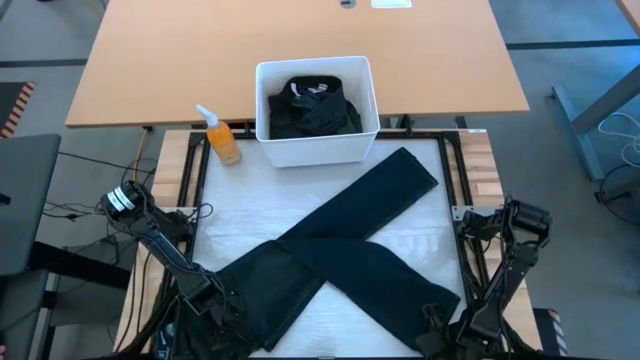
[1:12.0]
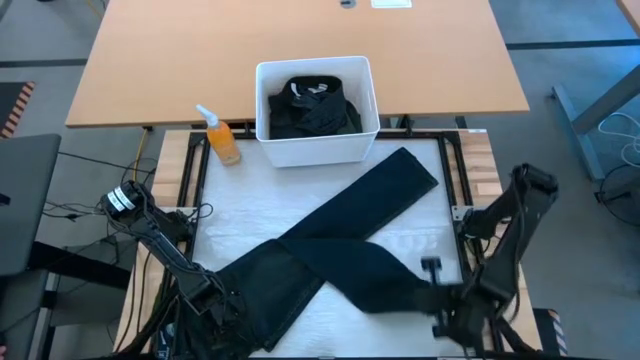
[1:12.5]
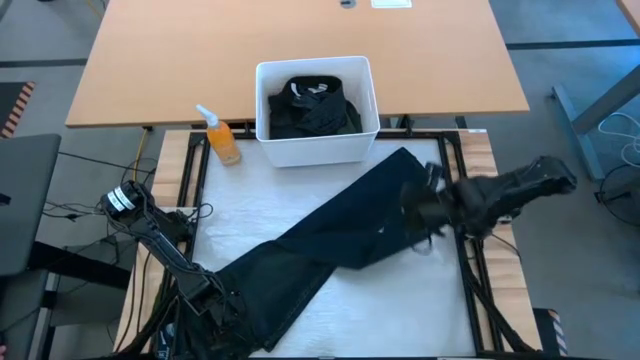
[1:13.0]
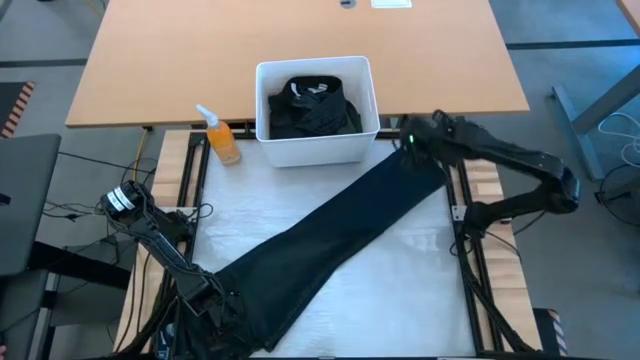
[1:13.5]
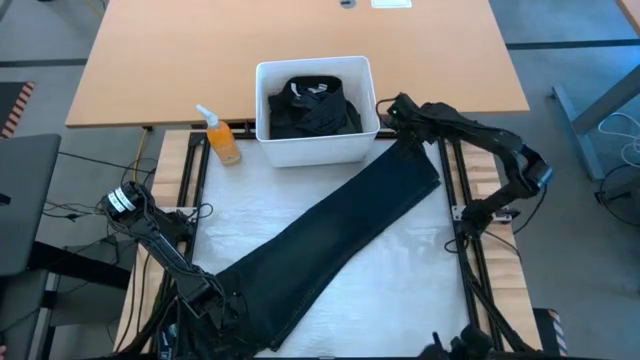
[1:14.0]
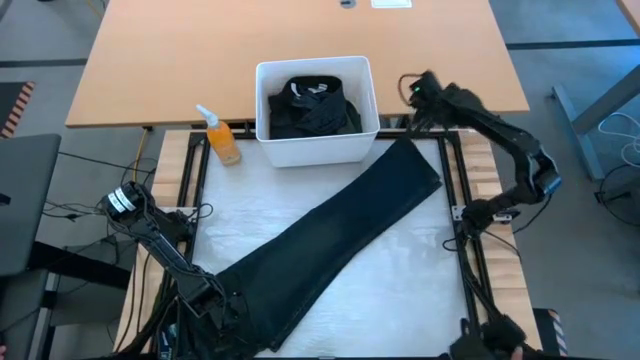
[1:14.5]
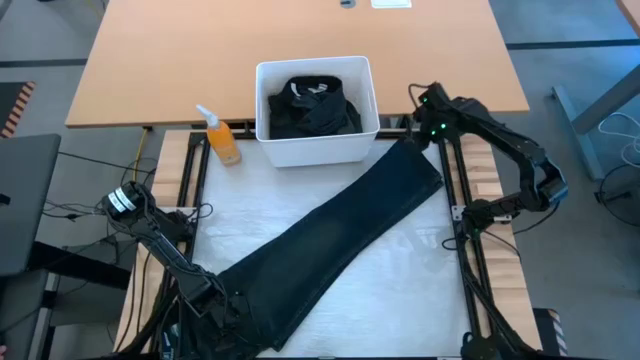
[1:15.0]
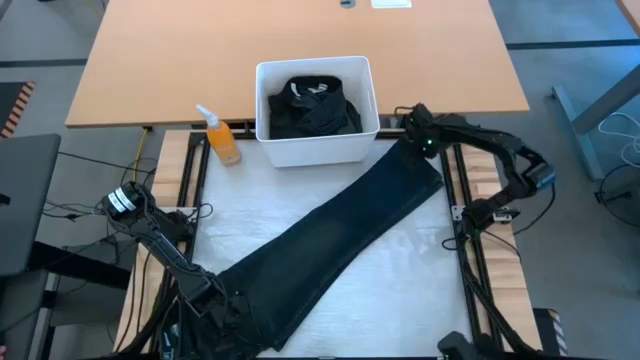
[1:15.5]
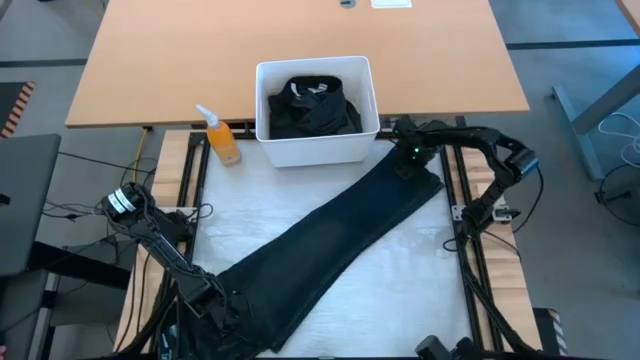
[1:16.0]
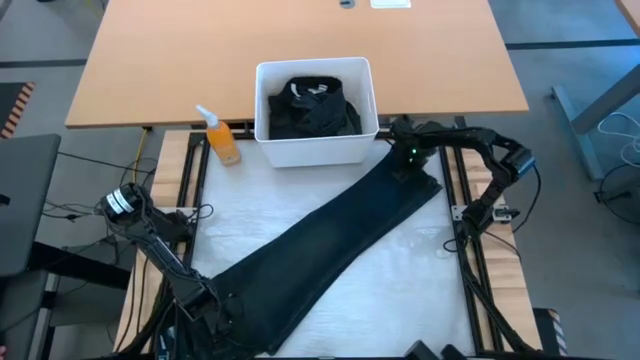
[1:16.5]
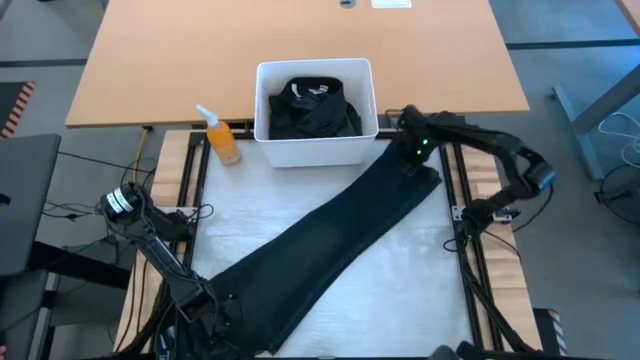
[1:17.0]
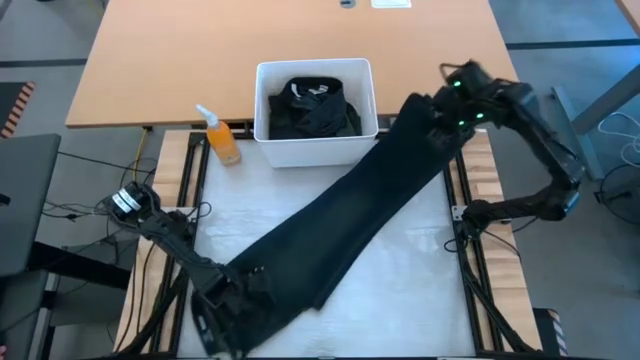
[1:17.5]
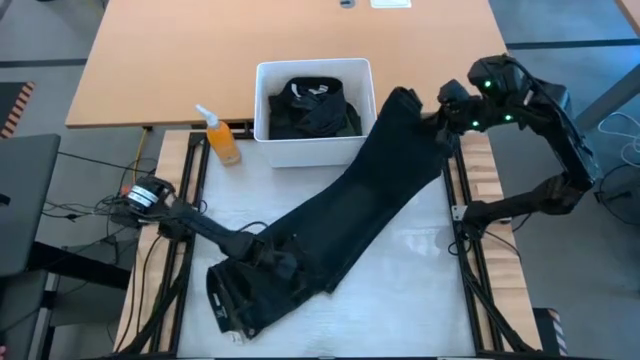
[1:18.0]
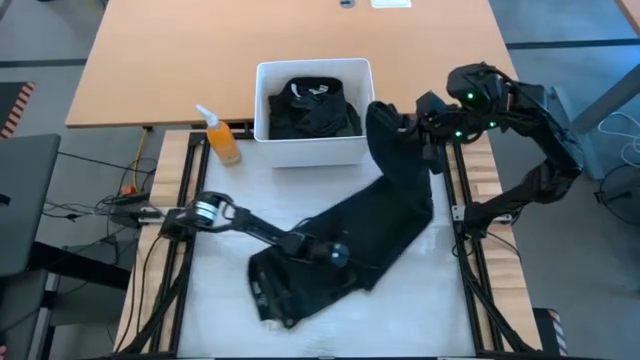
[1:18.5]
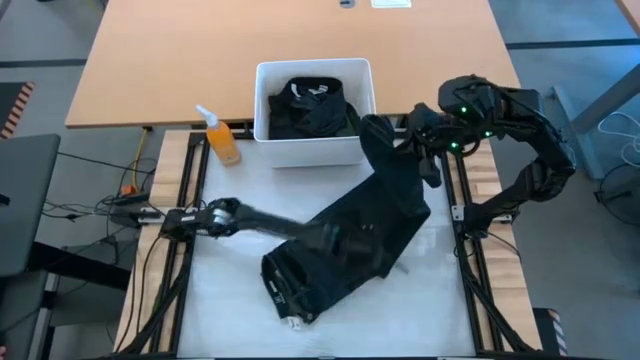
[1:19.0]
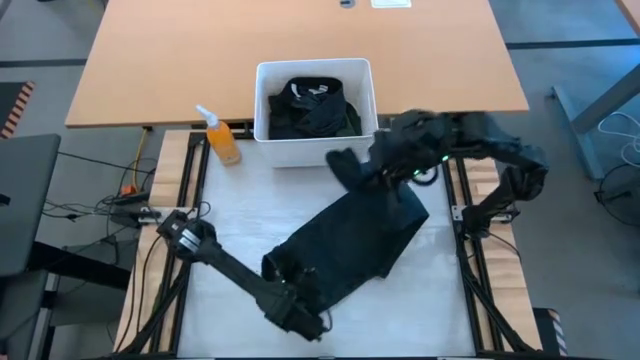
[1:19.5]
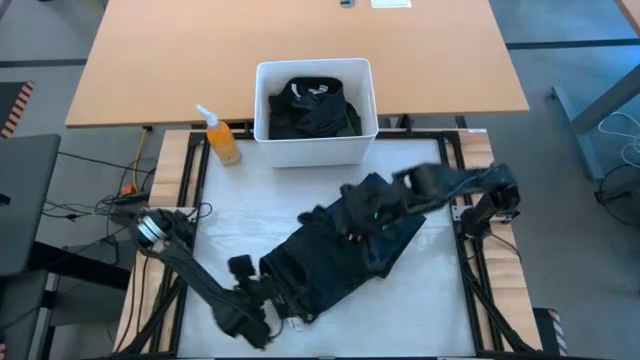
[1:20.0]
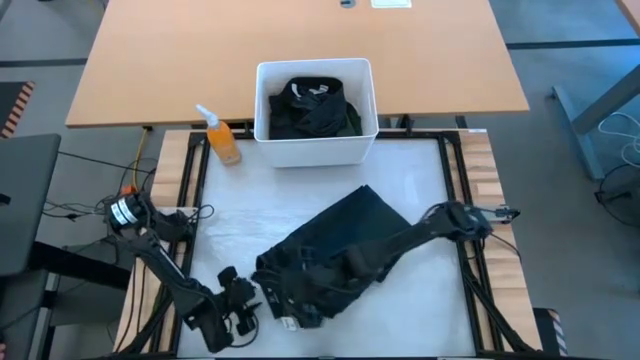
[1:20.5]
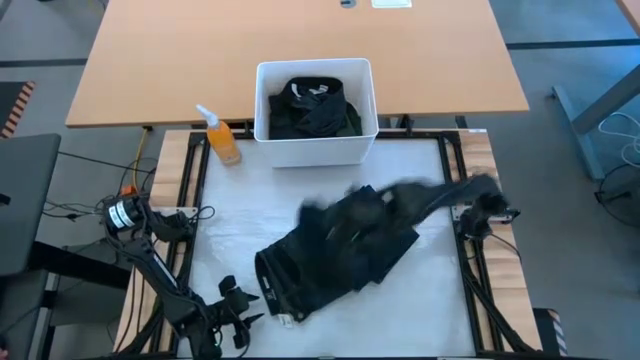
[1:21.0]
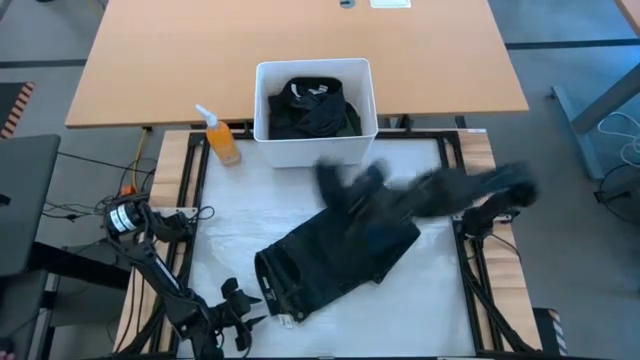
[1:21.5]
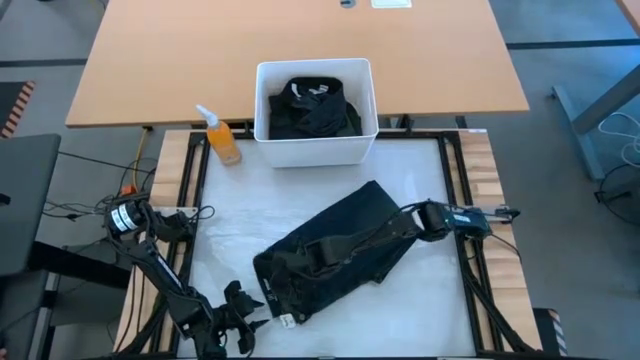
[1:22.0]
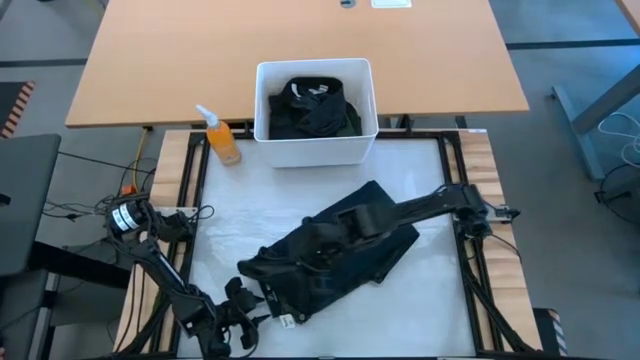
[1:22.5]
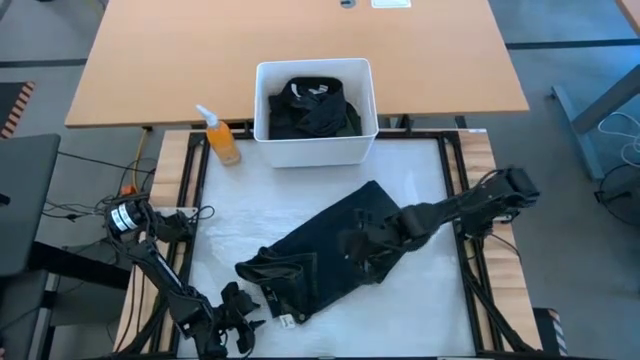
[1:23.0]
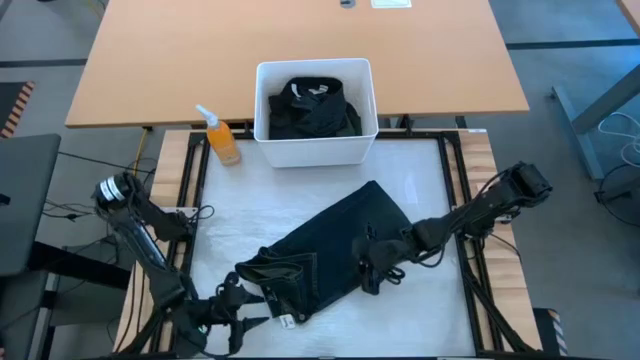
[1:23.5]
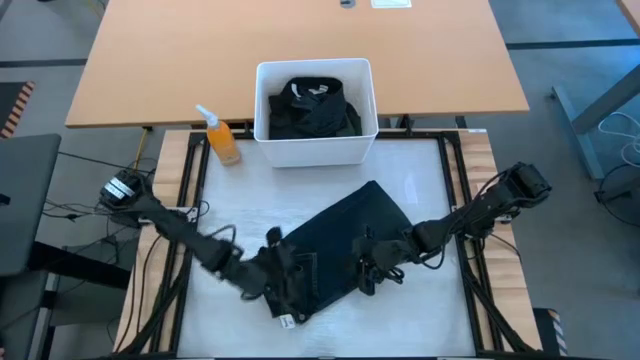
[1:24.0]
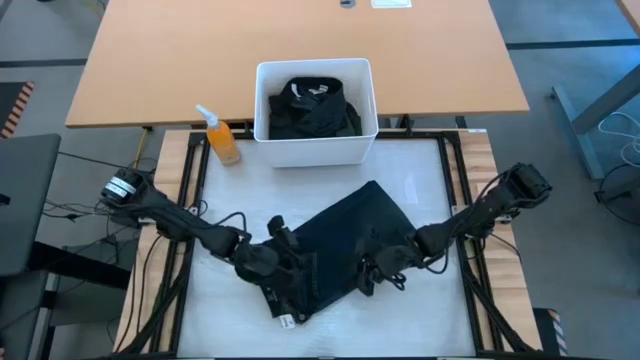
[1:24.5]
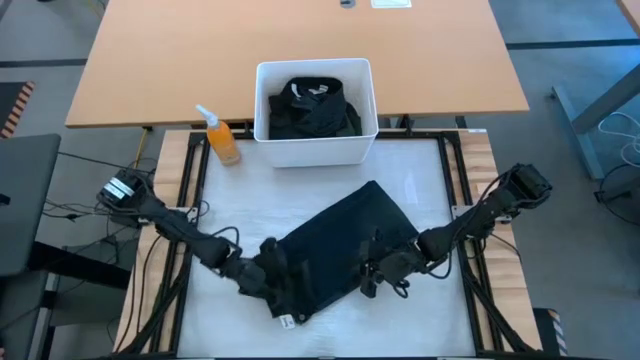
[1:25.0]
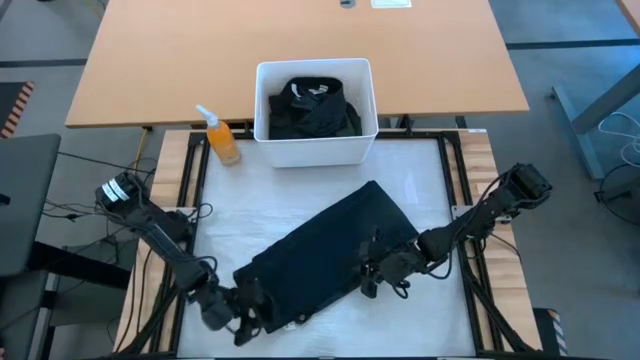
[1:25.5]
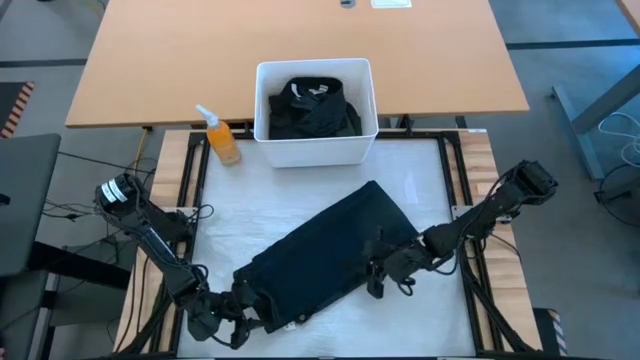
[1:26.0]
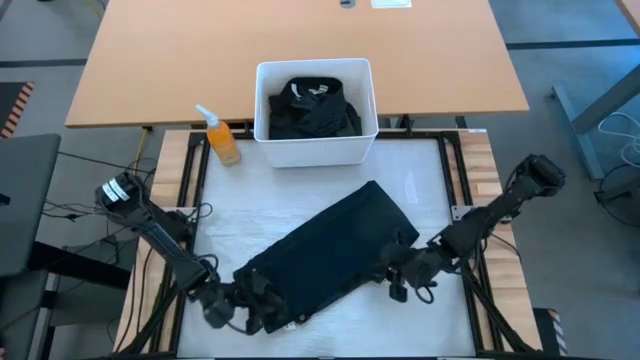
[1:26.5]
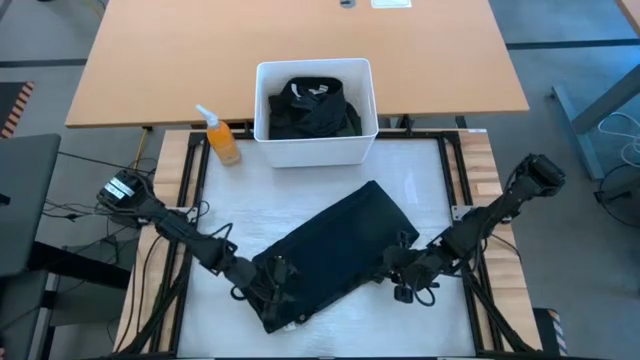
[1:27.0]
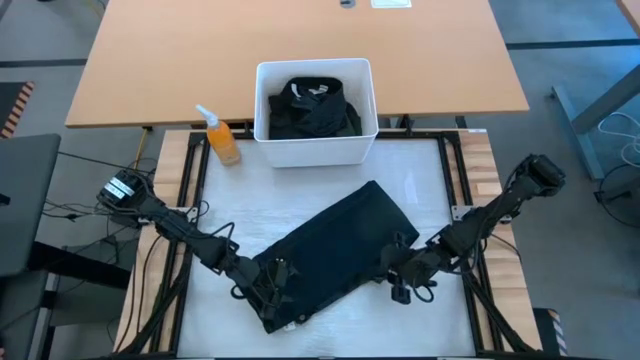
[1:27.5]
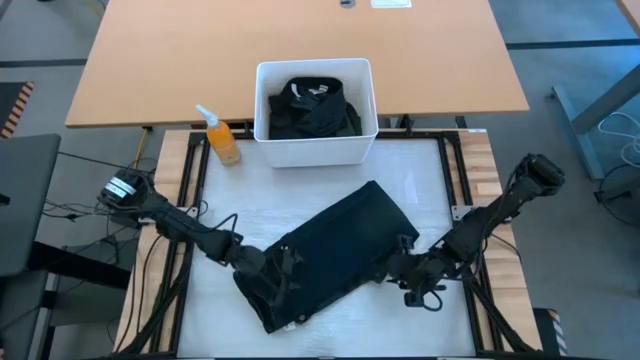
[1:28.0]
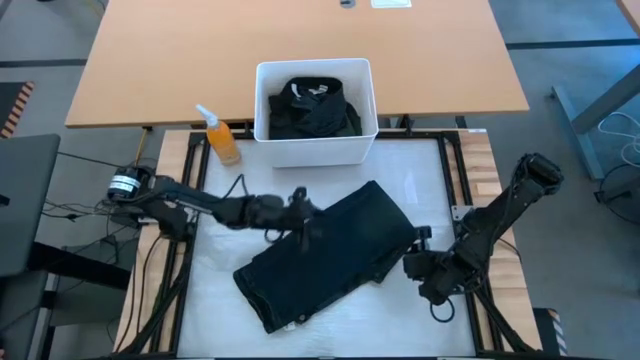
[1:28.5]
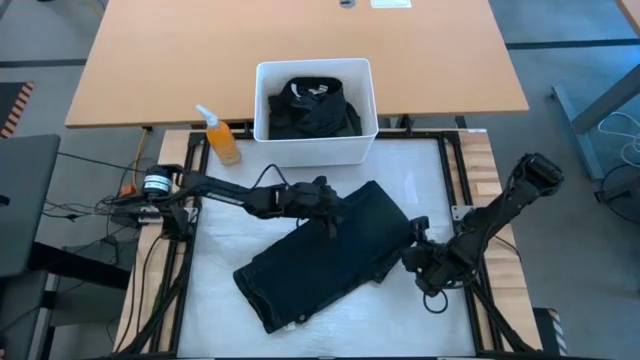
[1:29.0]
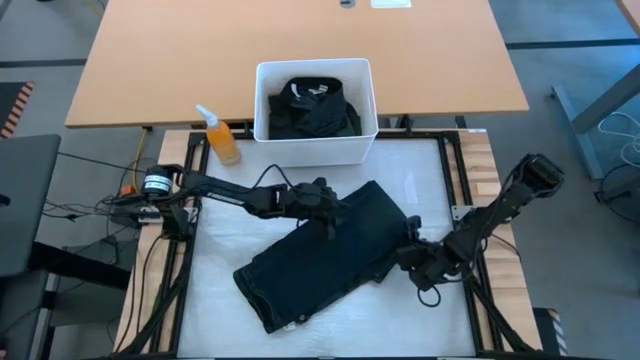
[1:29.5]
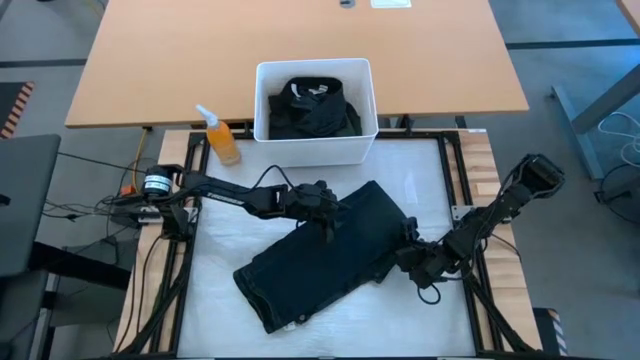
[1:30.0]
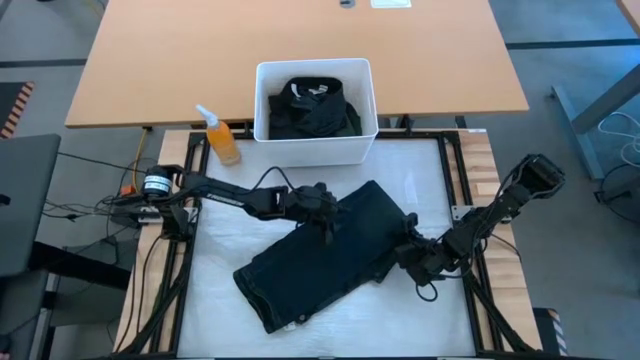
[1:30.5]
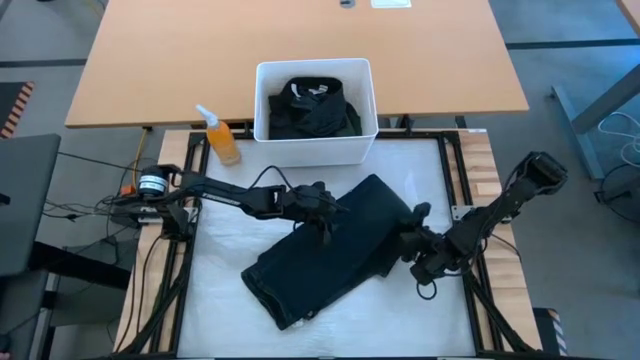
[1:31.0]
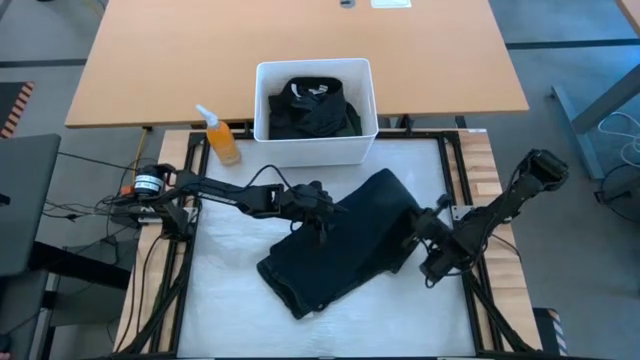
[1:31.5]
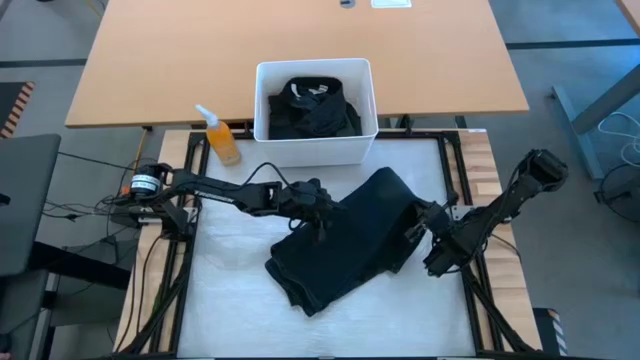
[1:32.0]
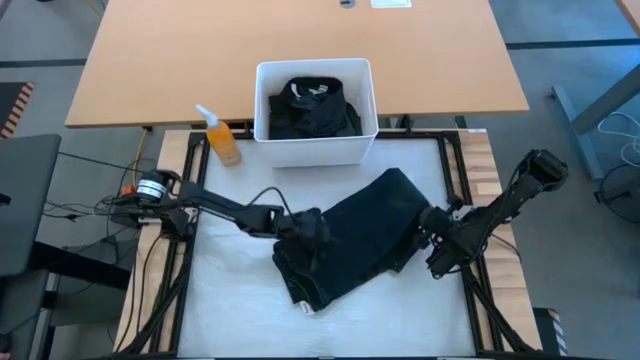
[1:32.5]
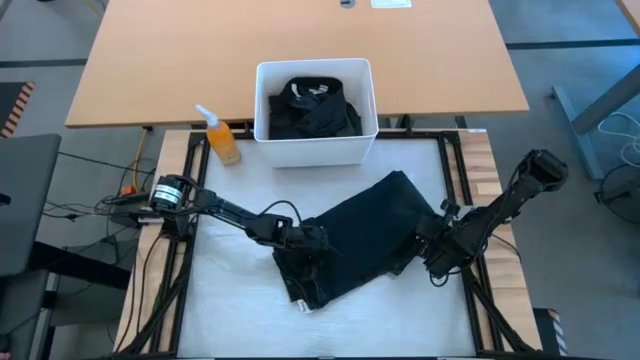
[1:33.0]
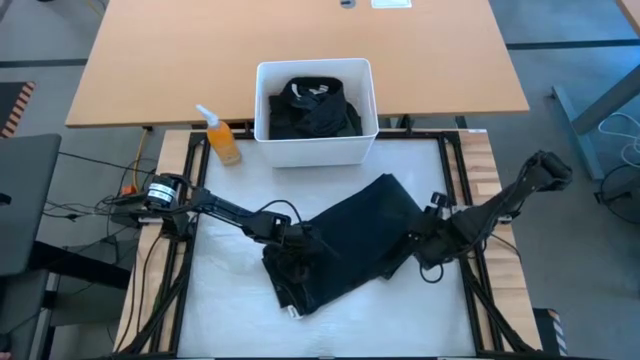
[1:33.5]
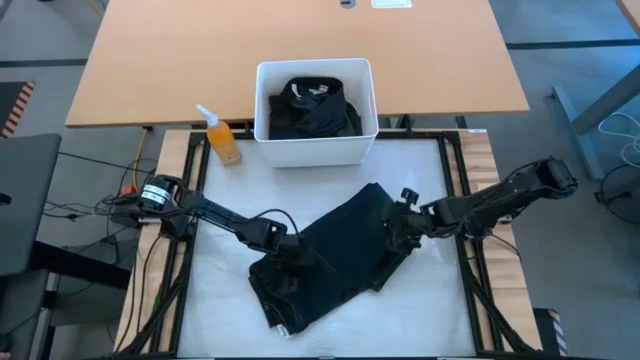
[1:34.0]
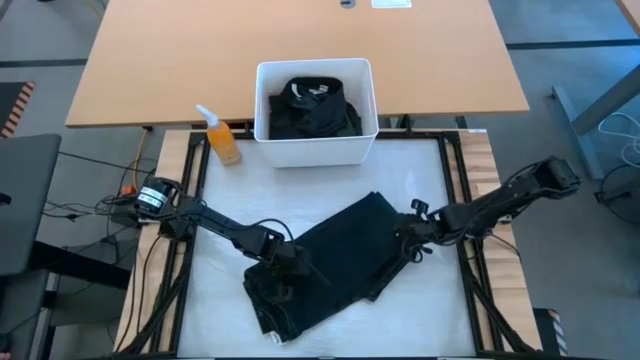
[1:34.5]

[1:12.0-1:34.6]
Task: Fold laundry
Fold the dark blue jeans from the white laundry organizer
